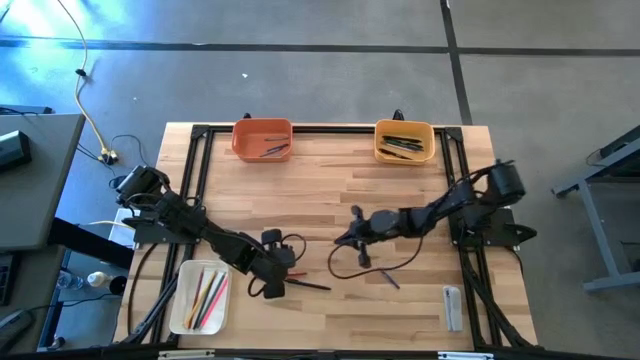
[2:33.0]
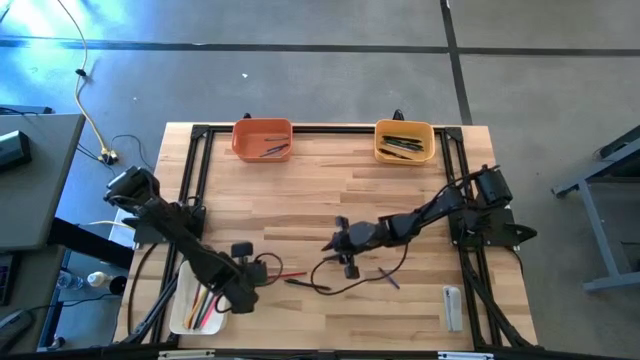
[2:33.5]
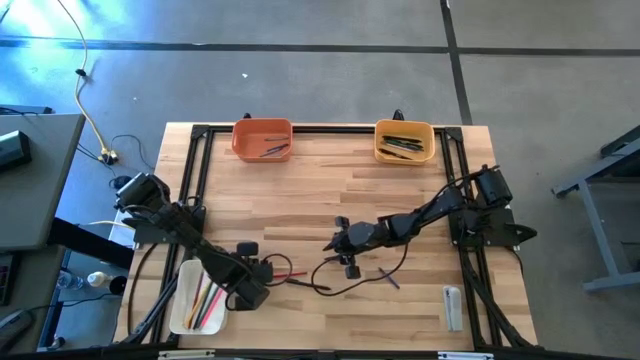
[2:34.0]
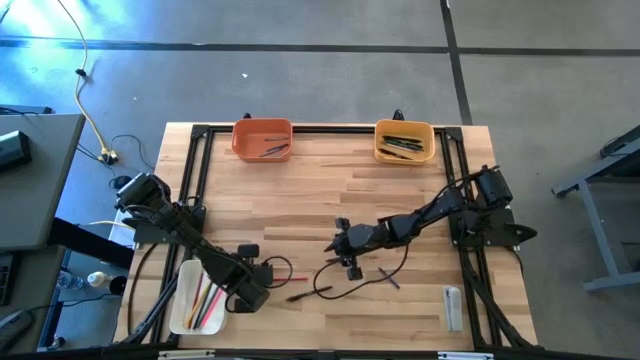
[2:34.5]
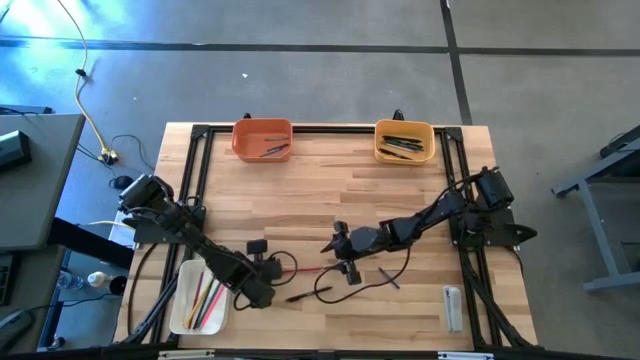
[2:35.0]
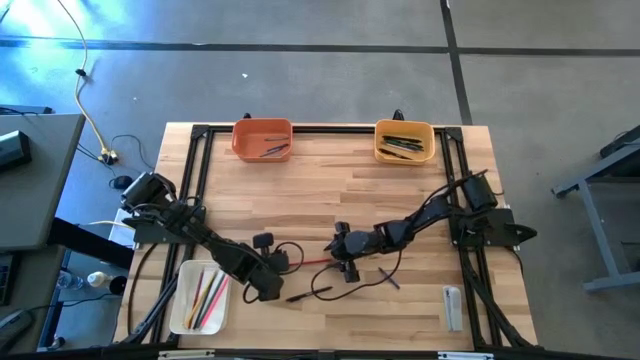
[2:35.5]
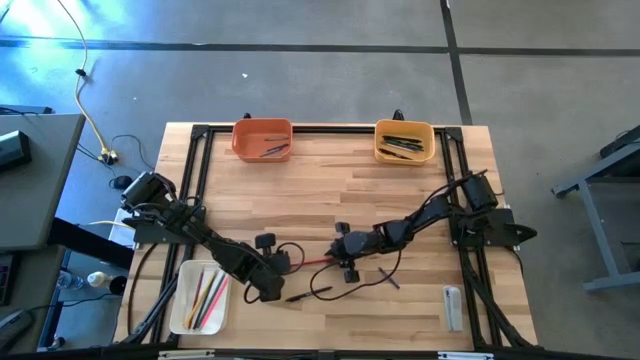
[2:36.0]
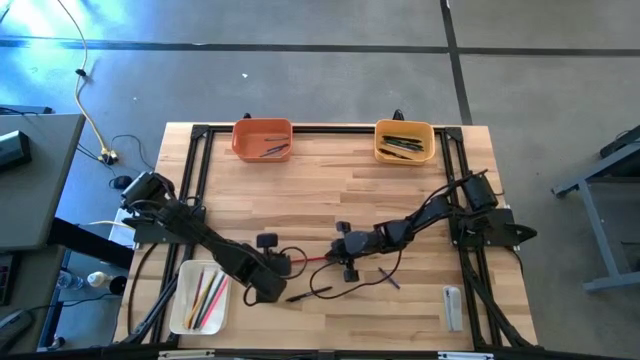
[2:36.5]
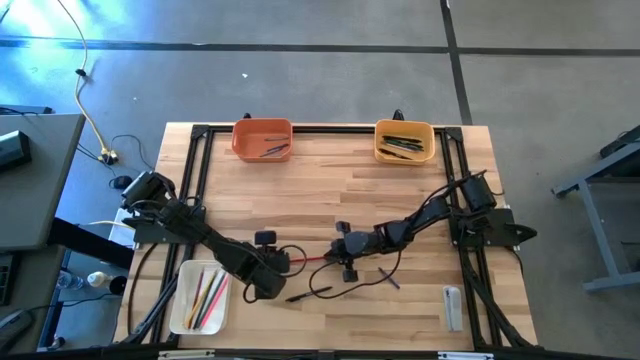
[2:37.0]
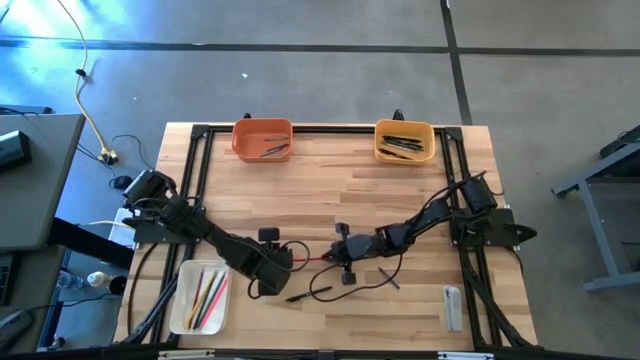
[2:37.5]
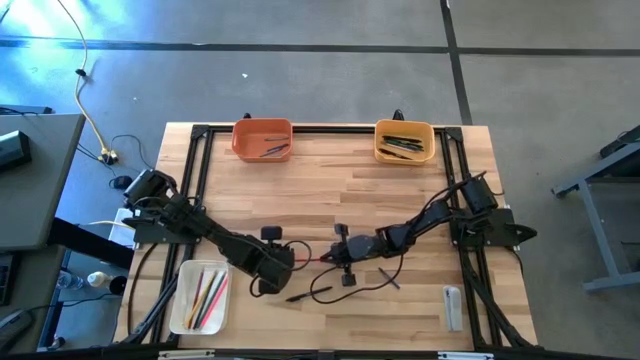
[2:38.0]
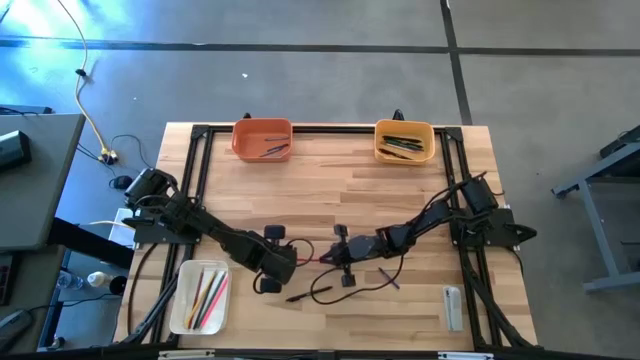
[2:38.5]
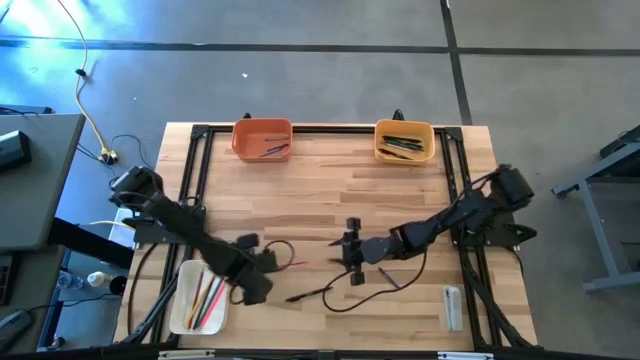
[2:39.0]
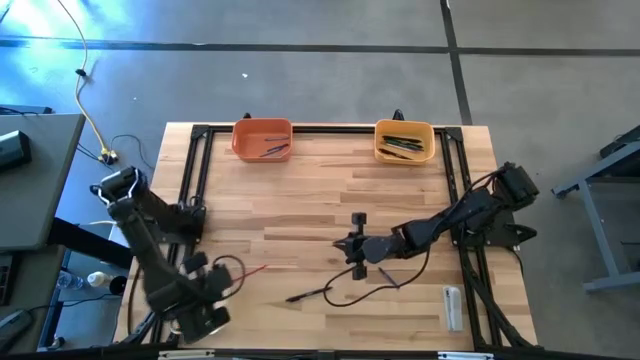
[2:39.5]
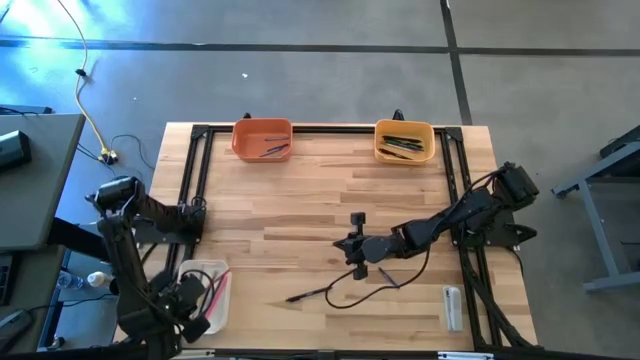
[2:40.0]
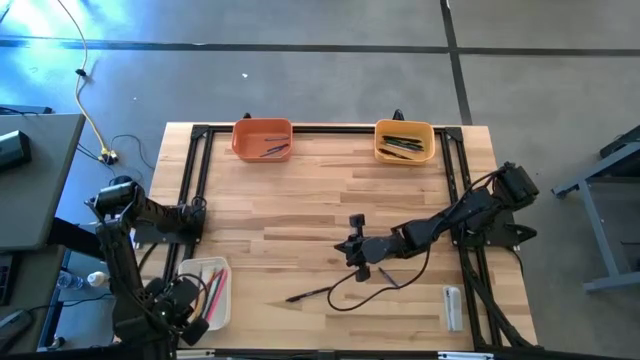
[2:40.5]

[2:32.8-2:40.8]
Task: Sort crayons/erasers/pens/pencils in bins
Put the red colored pencil into the white bin

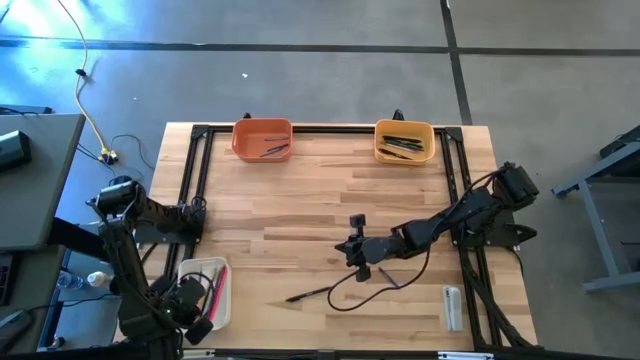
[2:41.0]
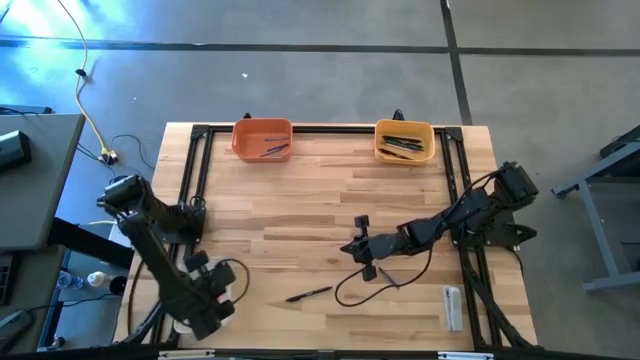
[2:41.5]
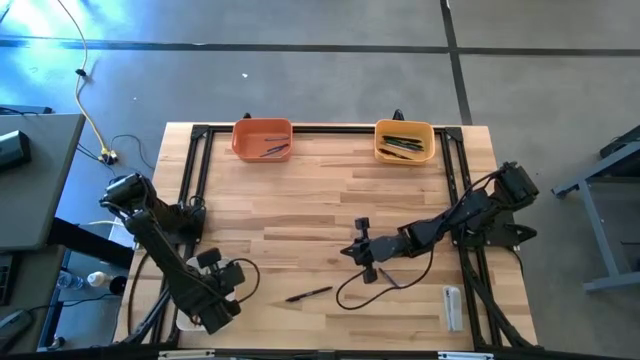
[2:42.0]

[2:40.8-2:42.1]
Adjust the white bin

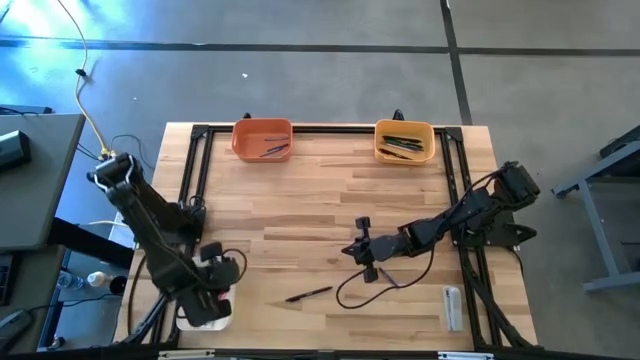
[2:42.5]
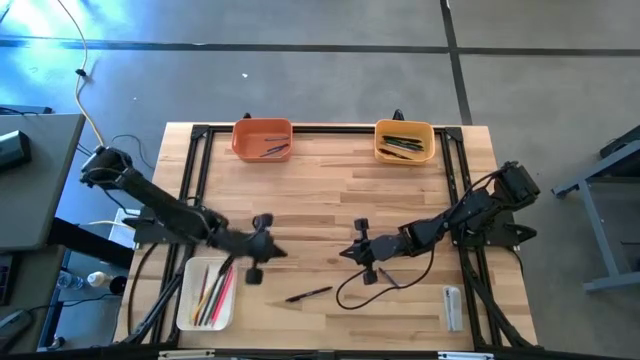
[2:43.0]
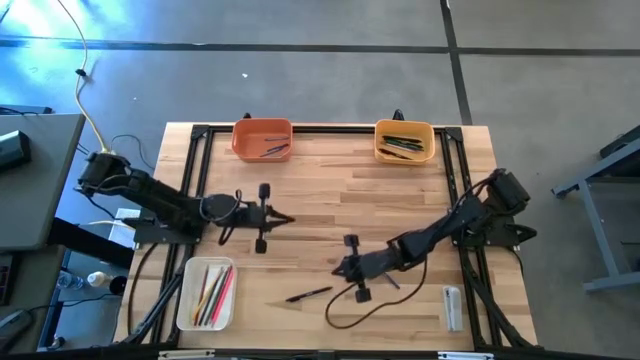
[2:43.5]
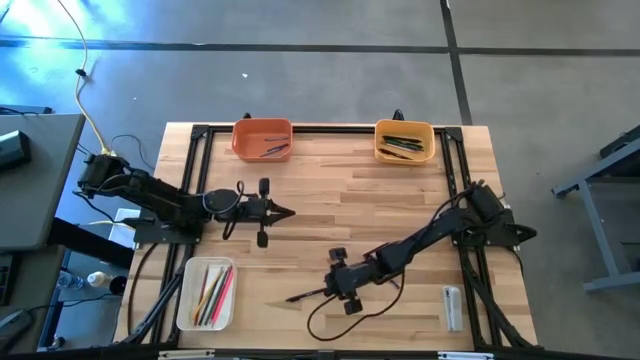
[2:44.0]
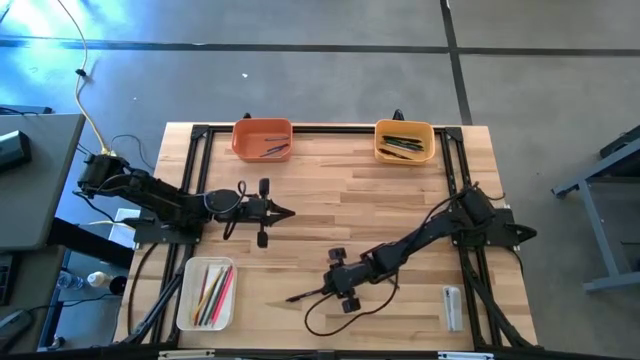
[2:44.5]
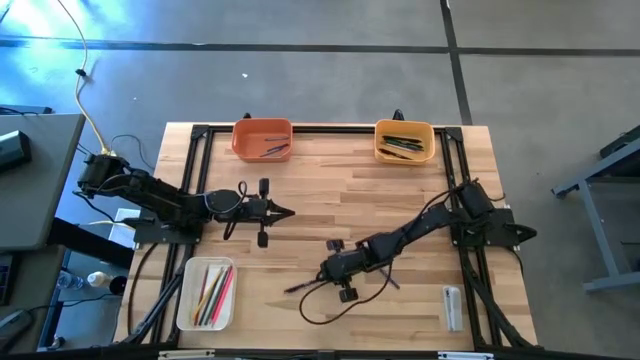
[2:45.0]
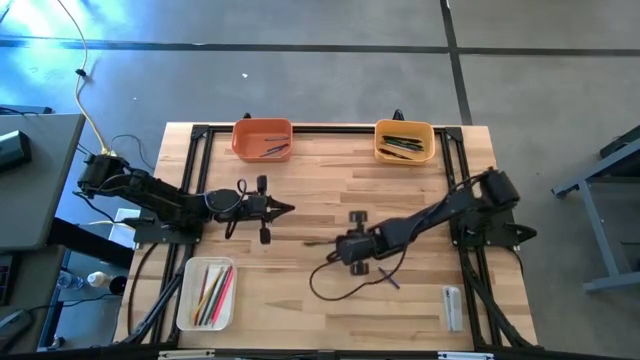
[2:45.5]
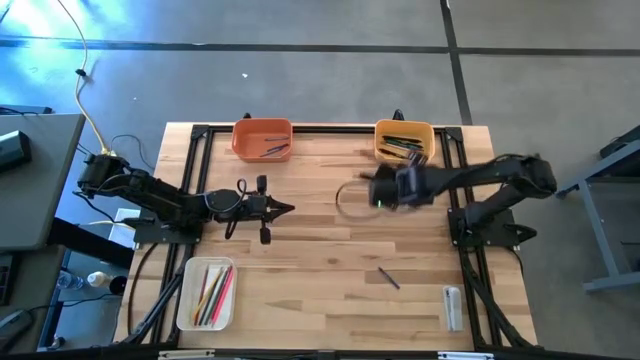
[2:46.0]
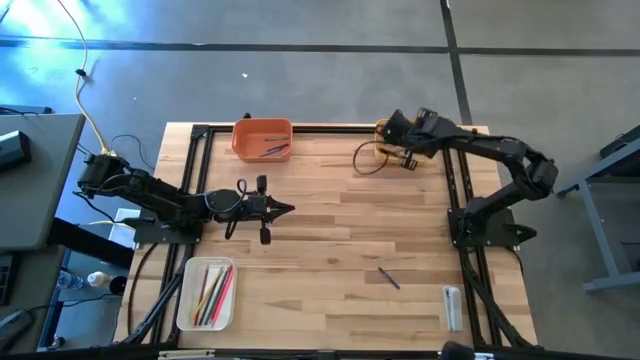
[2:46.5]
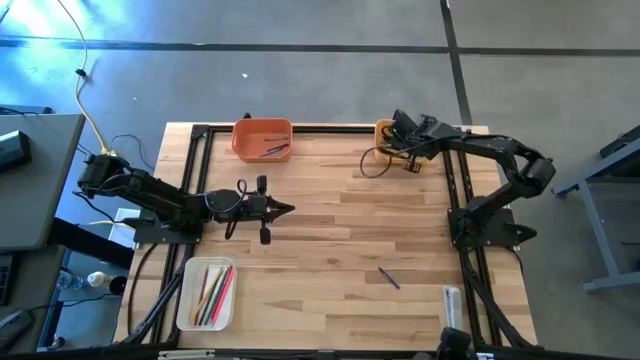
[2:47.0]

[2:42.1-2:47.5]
Put the black pen into the yellow bin

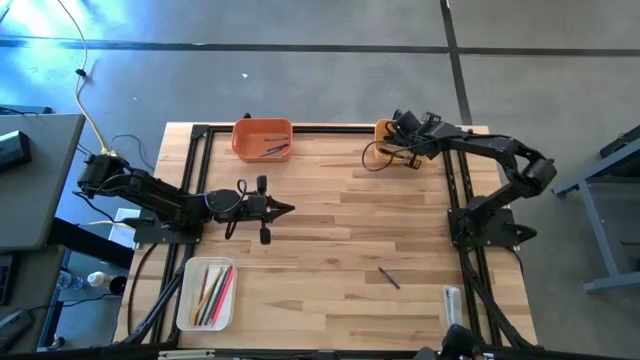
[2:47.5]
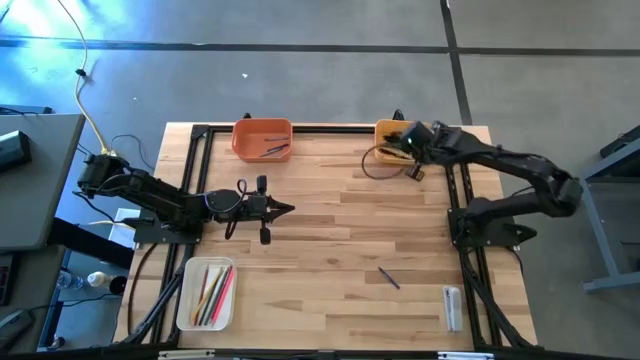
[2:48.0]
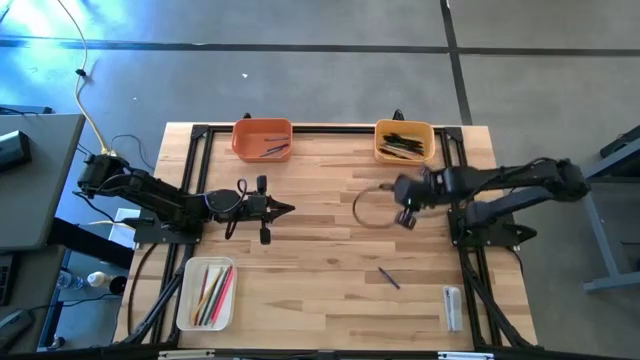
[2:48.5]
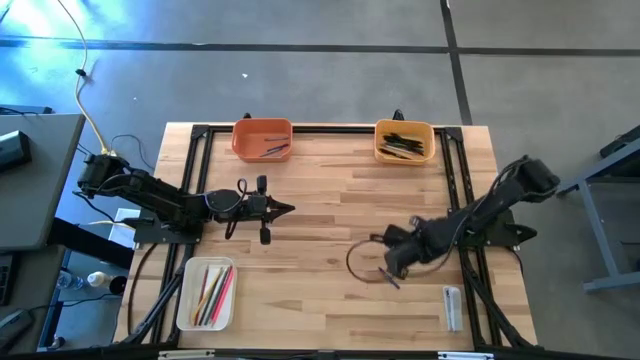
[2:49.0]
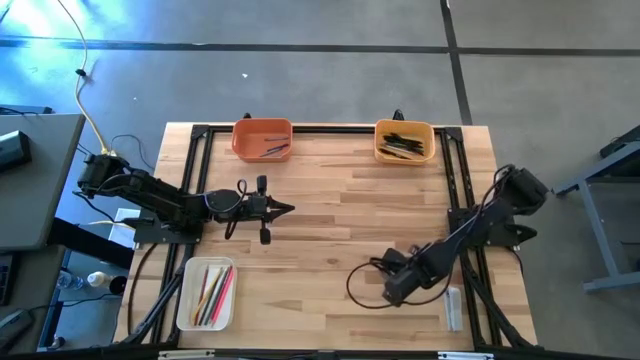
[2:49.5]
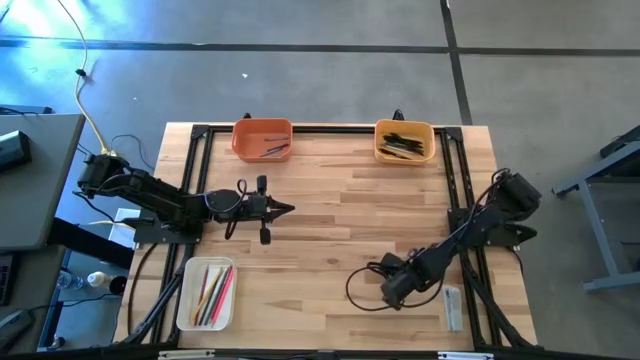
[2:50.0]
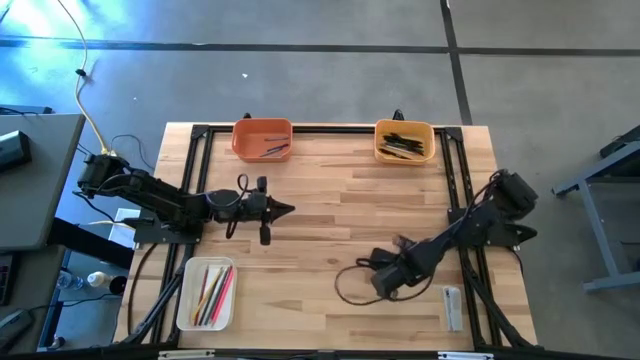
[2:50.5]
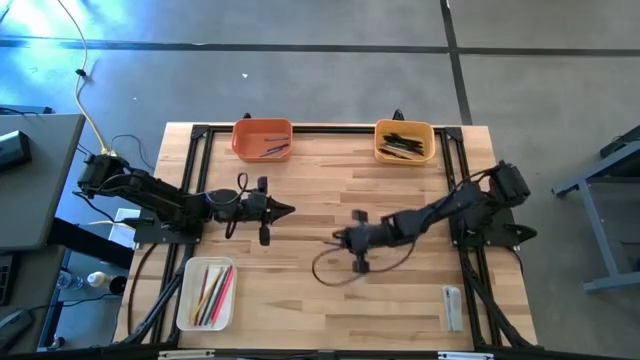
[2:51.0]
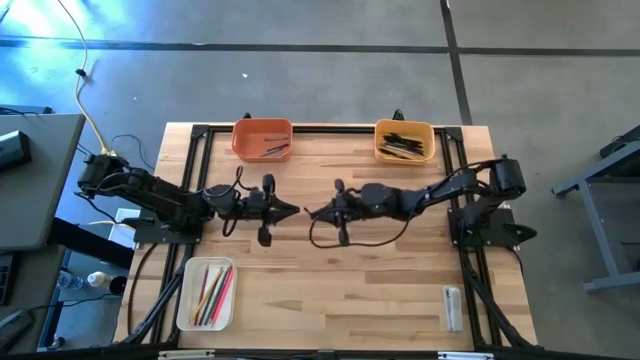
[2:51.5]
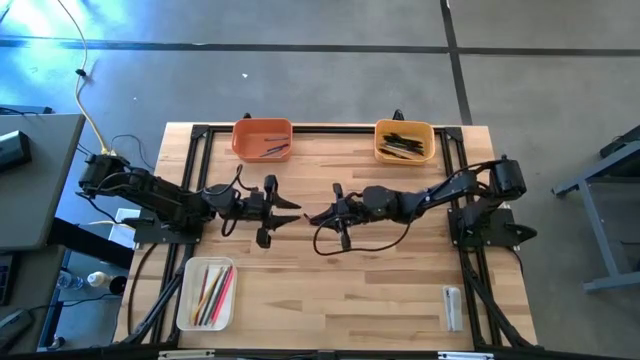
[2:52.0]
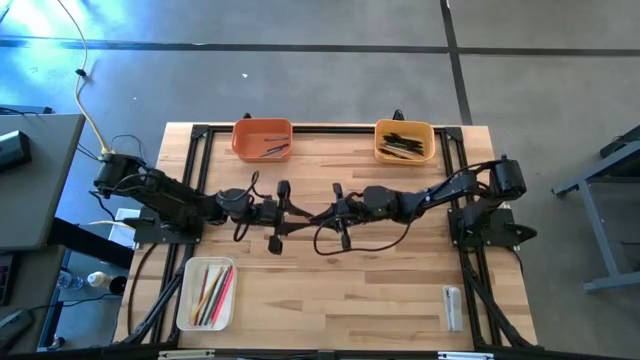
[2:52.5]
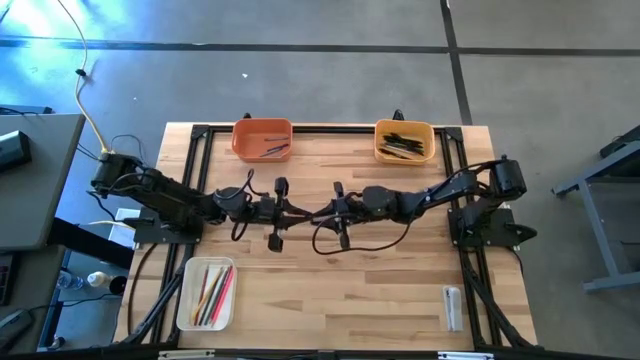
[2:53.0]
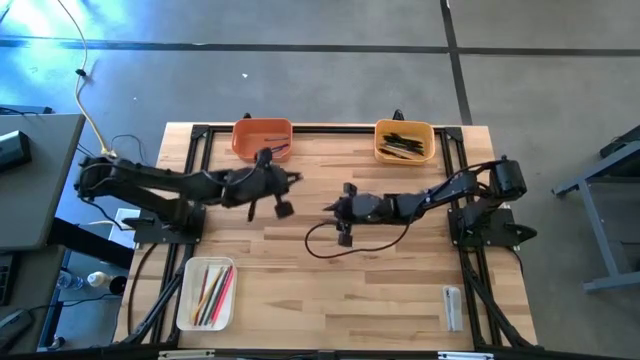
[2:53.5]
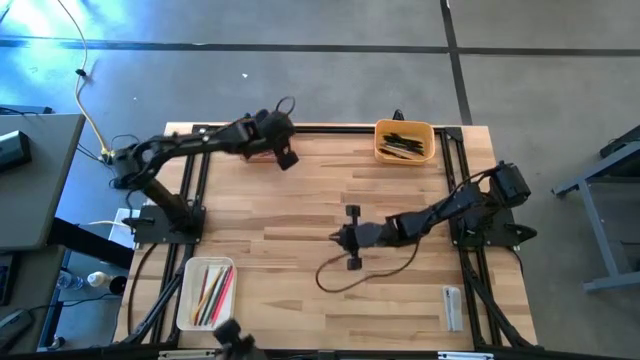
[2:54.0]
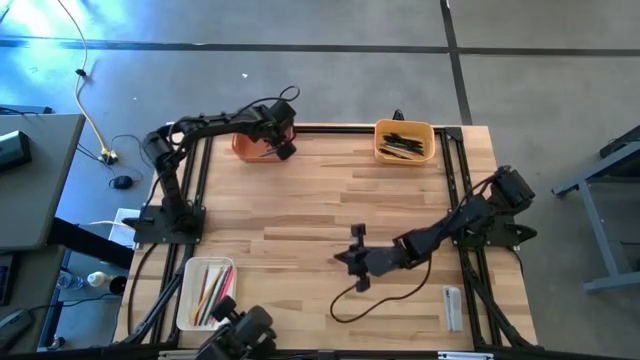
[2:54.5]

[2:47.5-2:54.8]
Put the blue crayon into the orange bin
